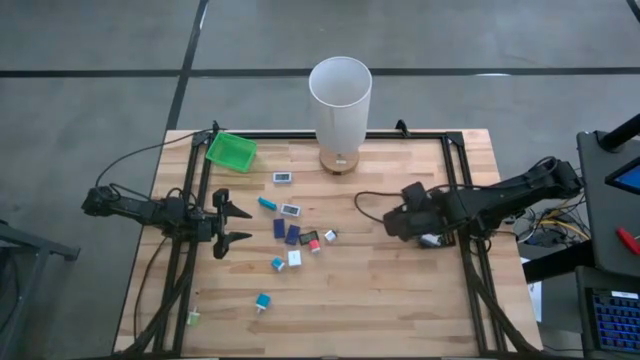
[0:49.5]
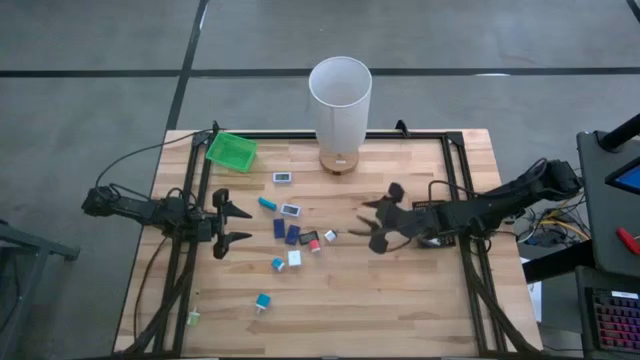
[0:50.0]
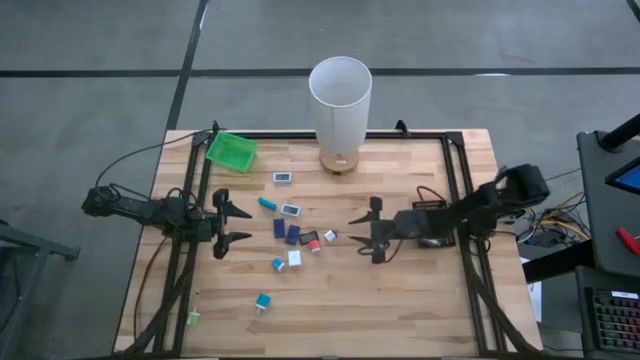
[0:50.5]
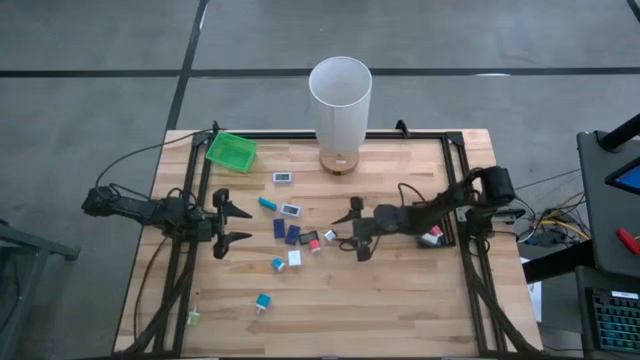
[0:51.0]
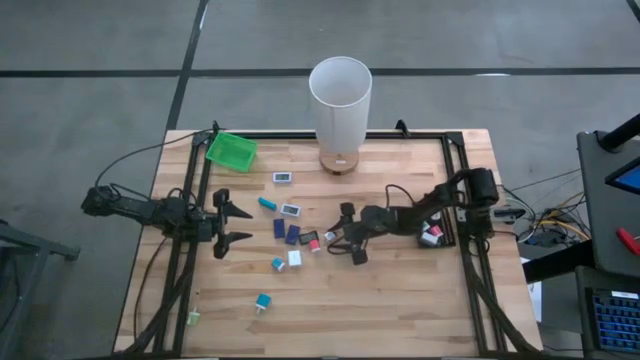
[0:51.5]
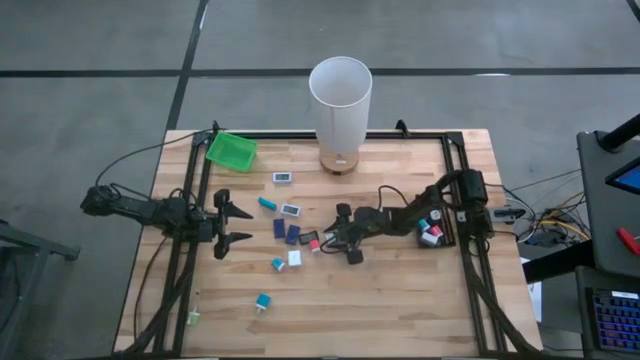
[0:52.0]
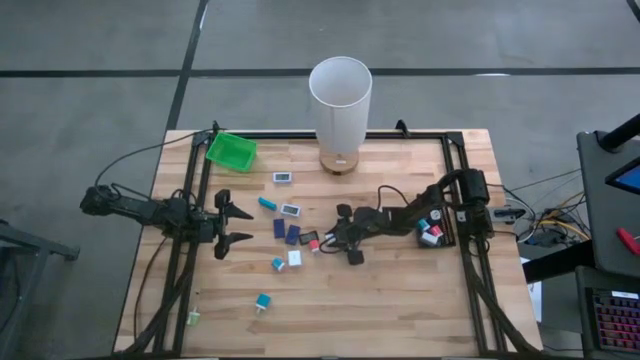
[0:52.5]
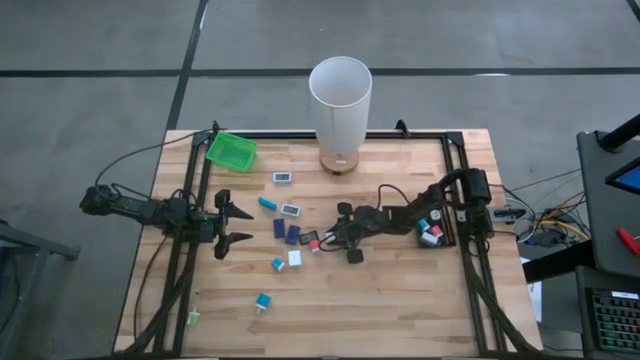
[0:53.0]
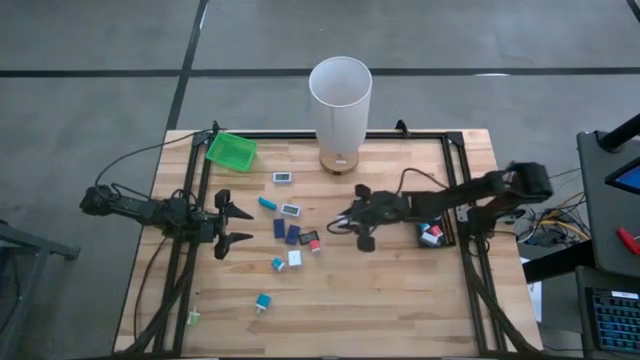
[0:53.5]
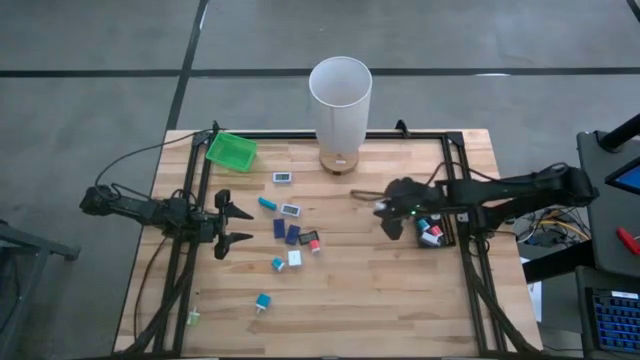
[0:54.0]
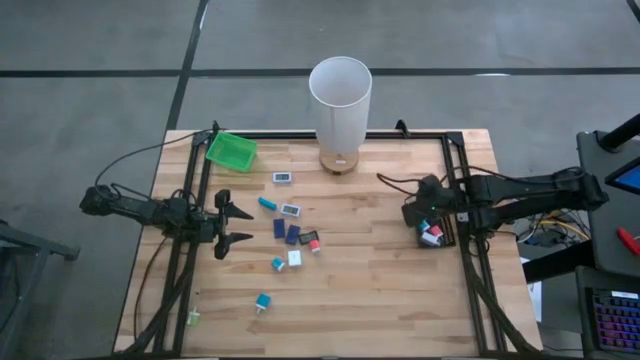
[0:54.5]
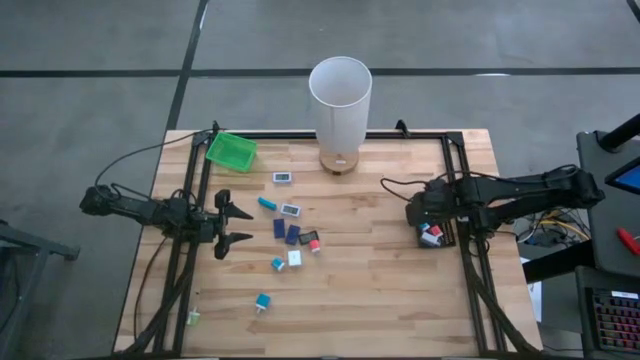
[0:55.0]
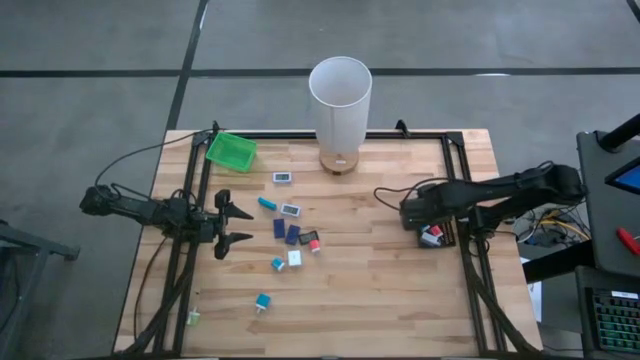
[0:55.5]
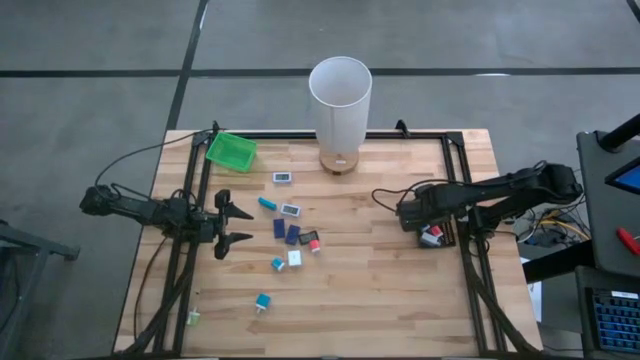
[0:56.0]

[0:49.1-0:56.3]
Task: Pick & Place Office items
Put the white black charger adapter into the black bin

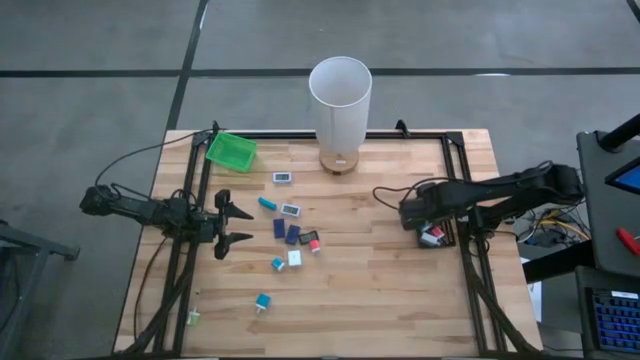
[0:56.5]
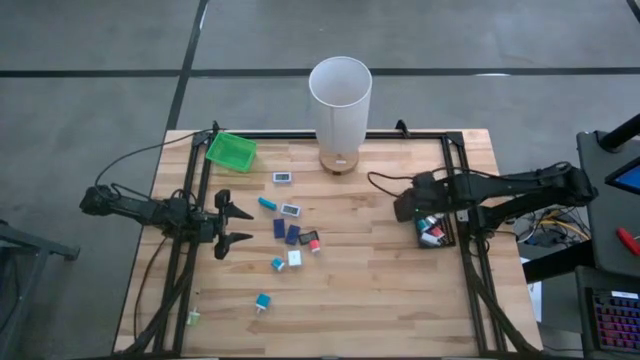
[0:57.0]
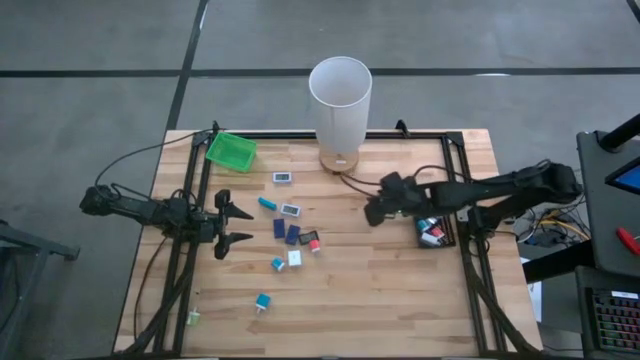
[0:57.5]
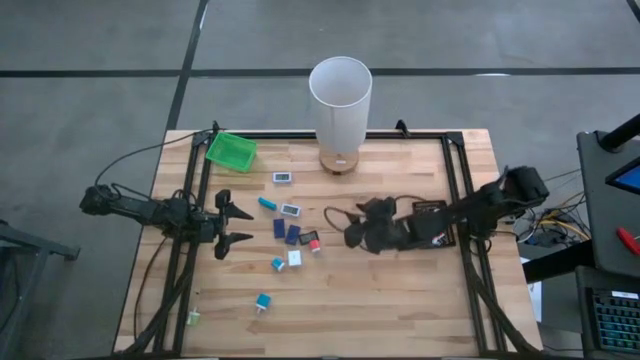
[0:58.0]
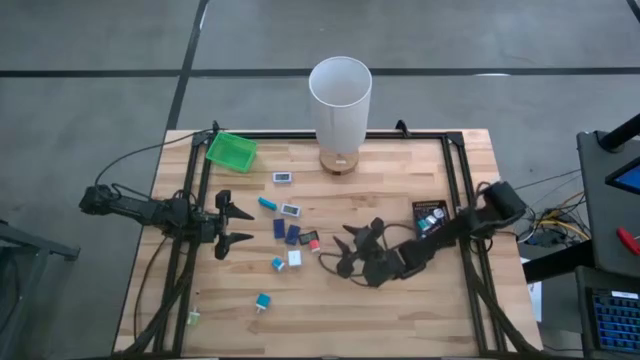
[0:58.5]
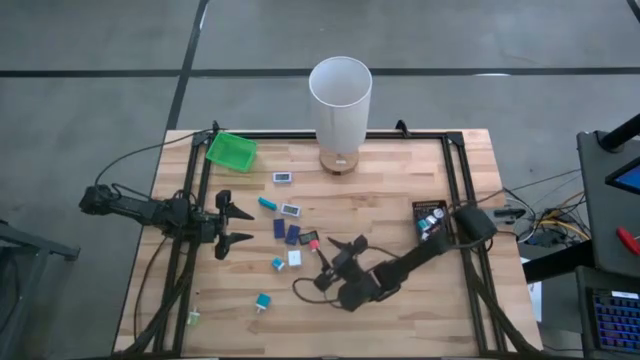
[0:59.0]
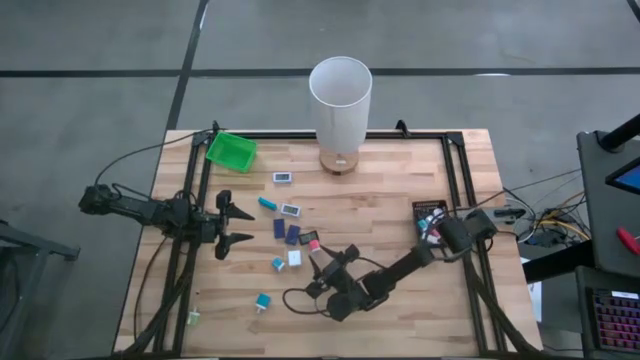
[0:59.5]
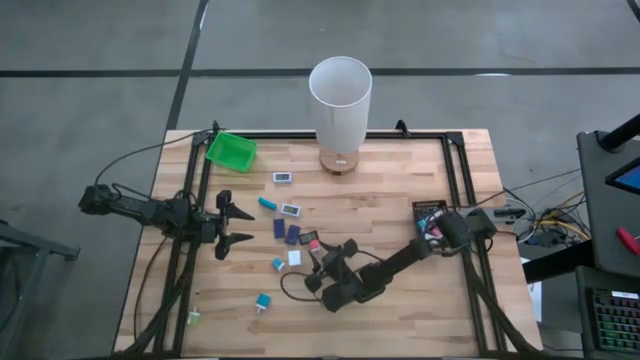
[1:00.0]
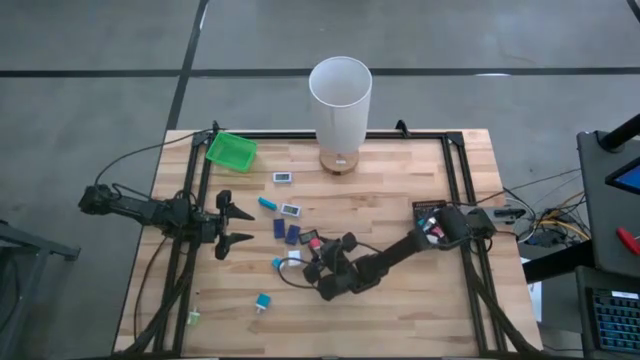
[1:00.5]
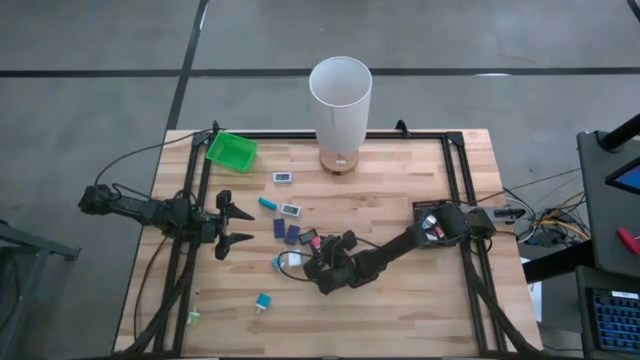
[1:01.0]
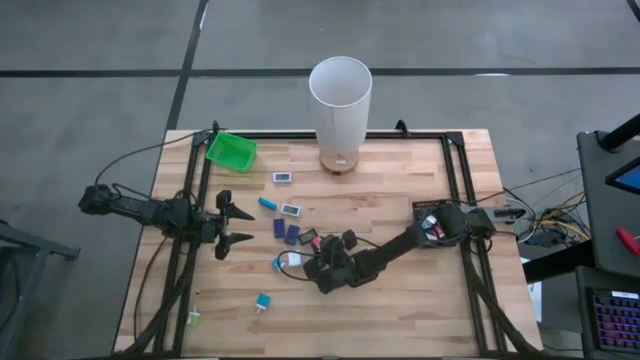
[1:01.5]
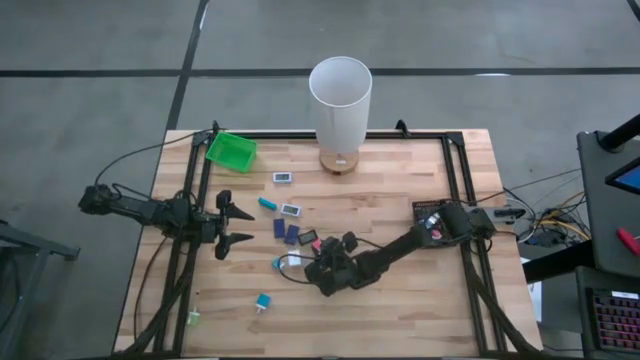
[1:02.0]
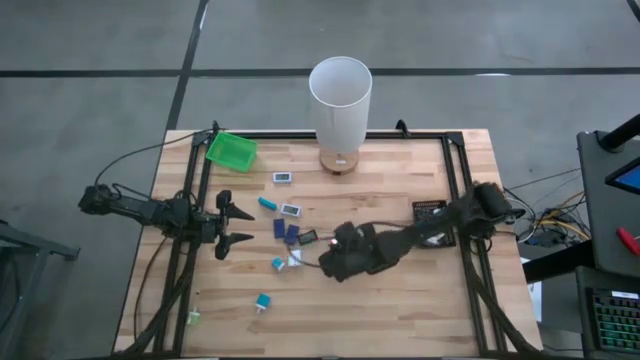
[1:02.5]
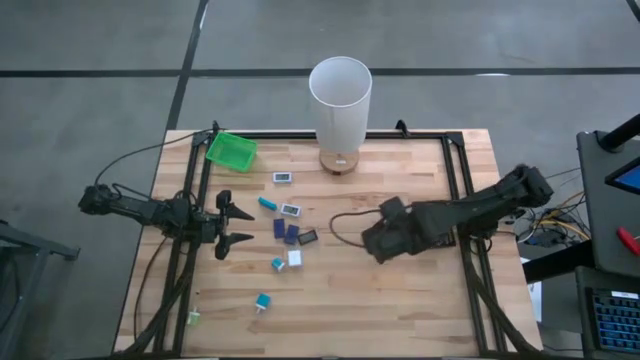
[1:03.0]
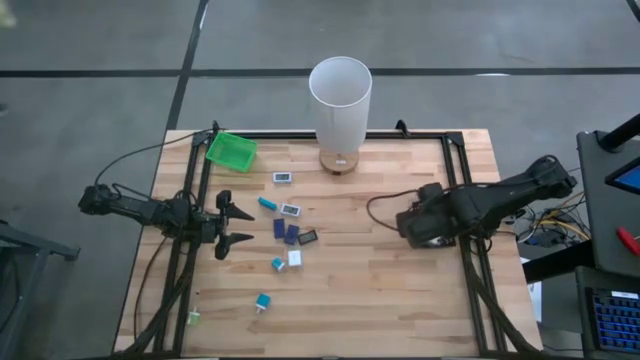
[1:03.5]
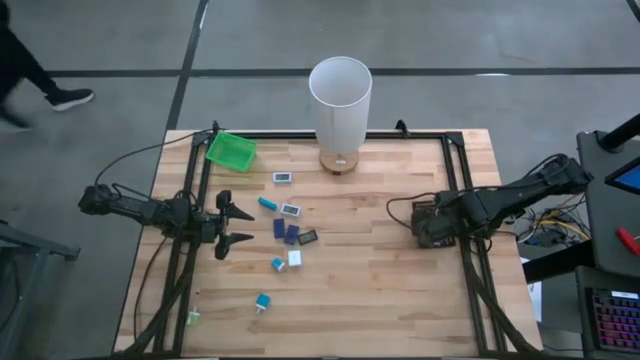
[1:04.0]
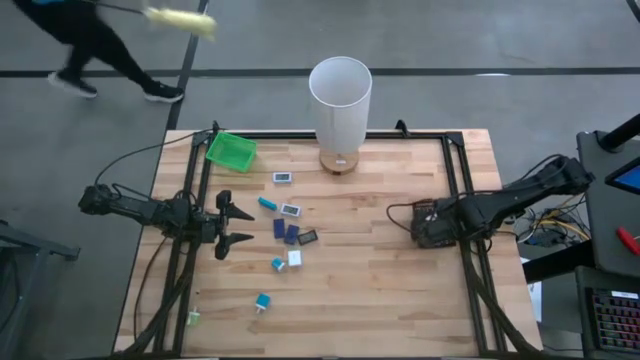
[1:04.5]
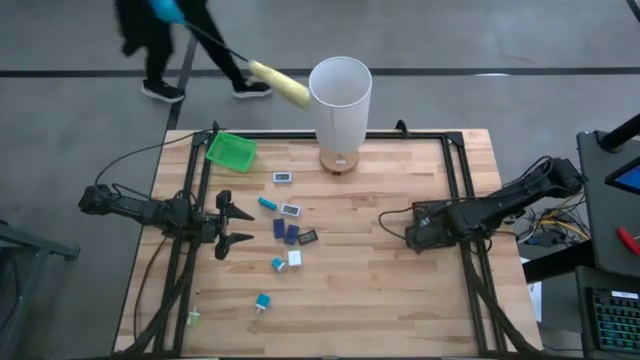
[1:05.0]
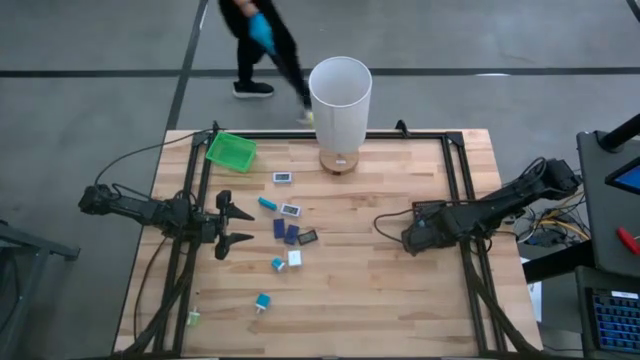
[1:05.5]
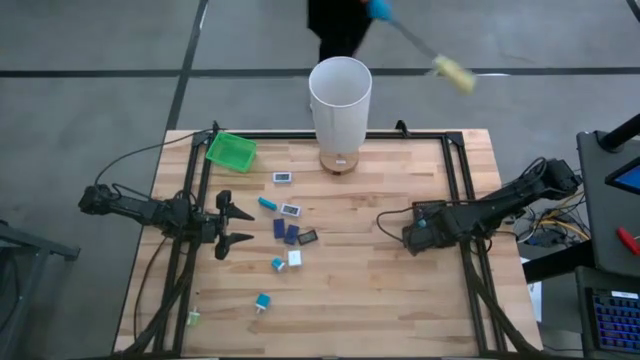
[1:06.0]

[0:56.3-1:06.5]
Put the pink charger adapter into the black bin

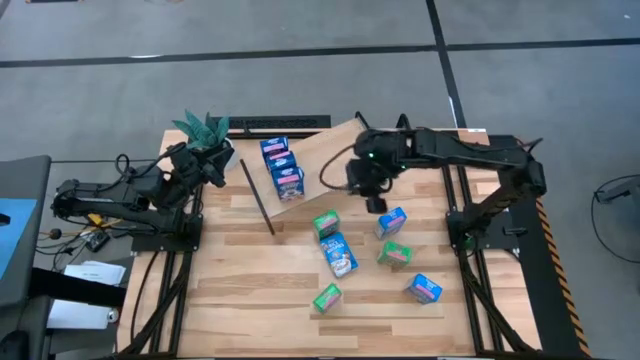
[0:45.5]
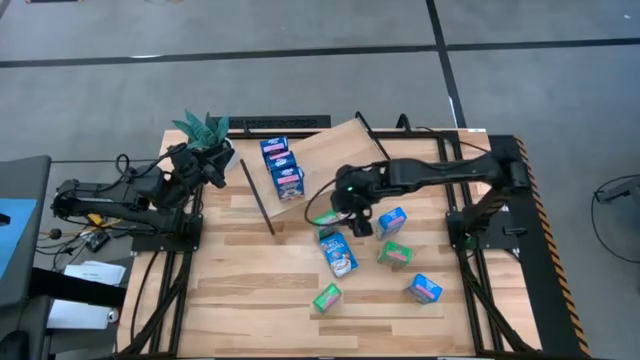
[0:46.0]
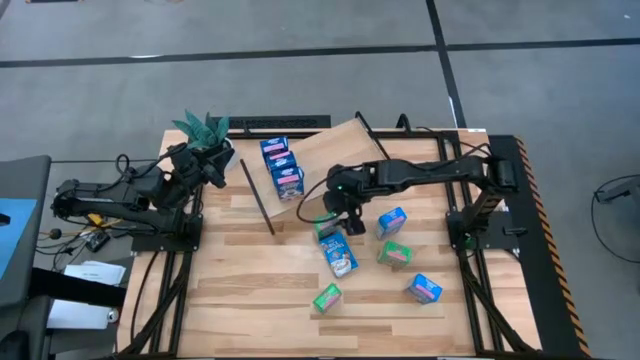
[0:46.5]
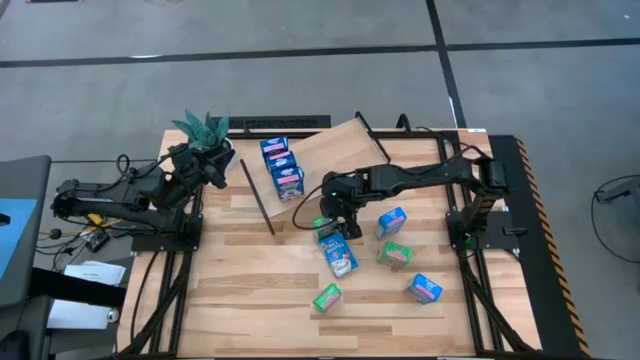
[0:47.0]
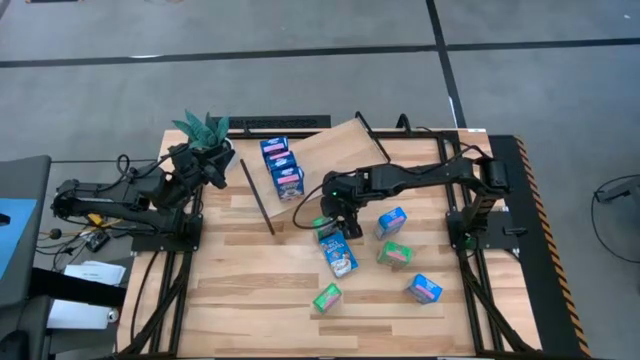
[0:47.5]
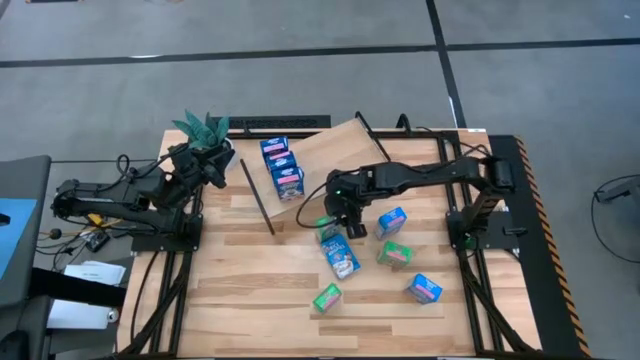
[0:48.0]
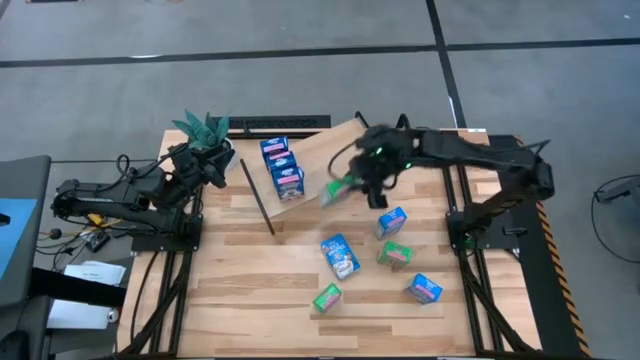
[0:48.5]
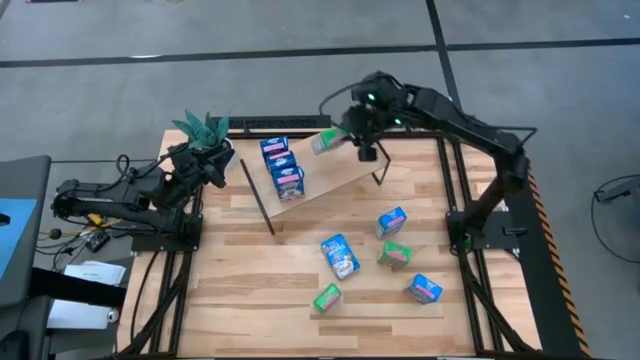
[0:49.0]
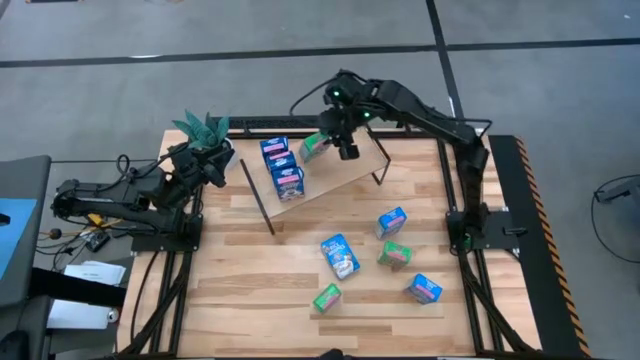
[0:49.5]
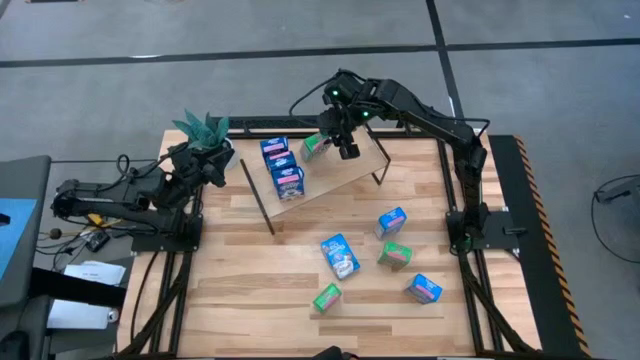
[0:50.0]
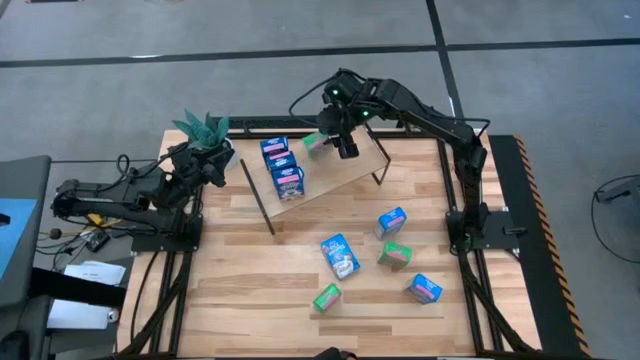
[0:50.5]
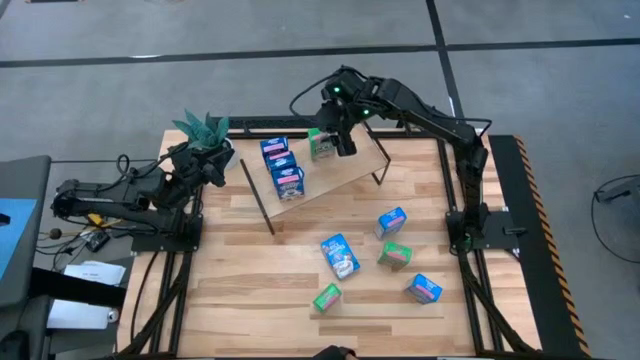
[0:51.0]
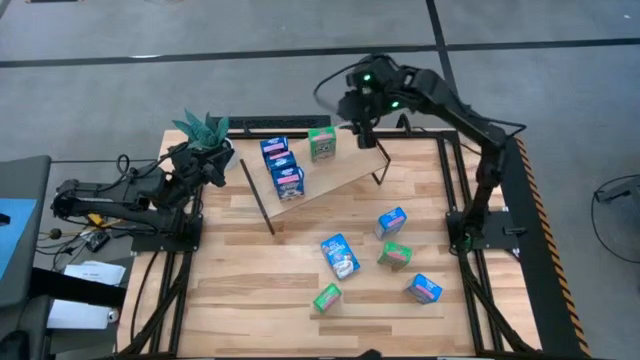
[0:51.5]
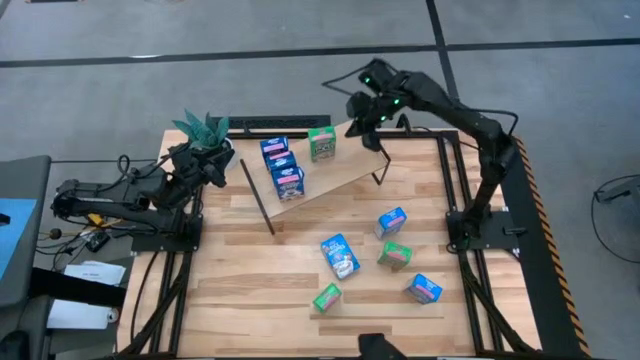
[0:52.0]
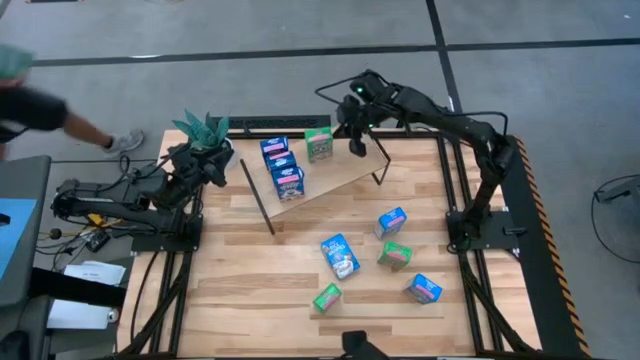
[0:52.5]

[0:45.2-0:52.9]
Task: Stack cereal on shelf
Put the top green cereal box on the shelf
